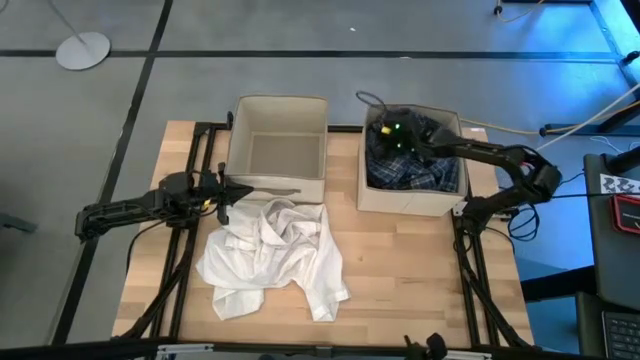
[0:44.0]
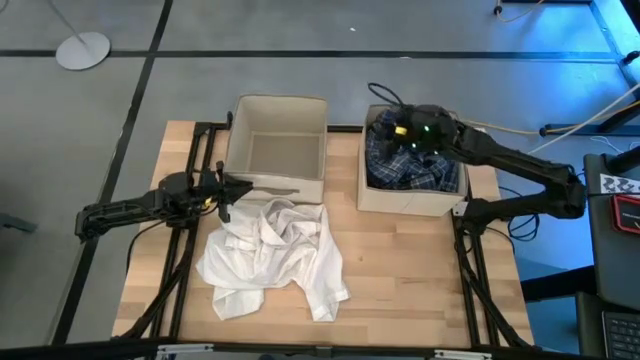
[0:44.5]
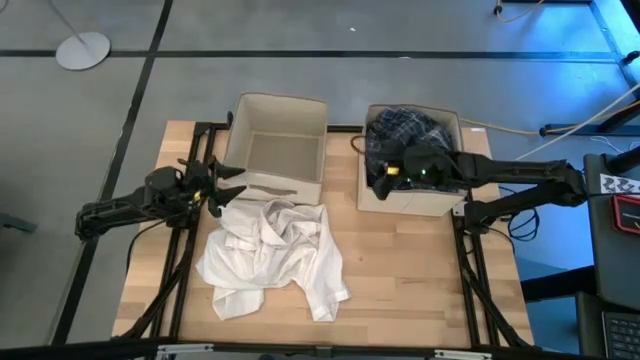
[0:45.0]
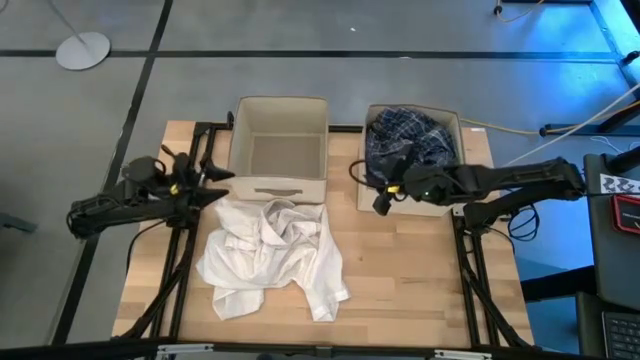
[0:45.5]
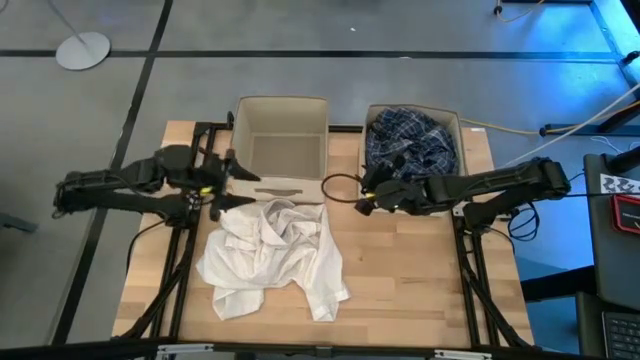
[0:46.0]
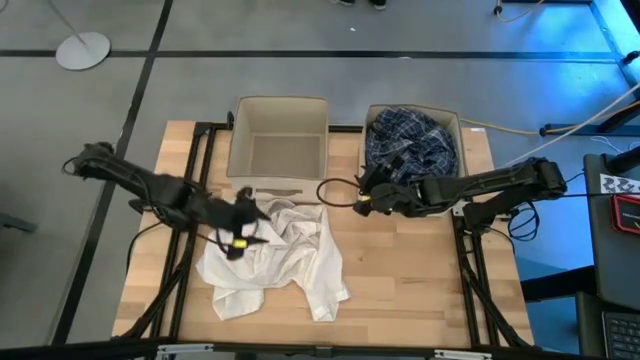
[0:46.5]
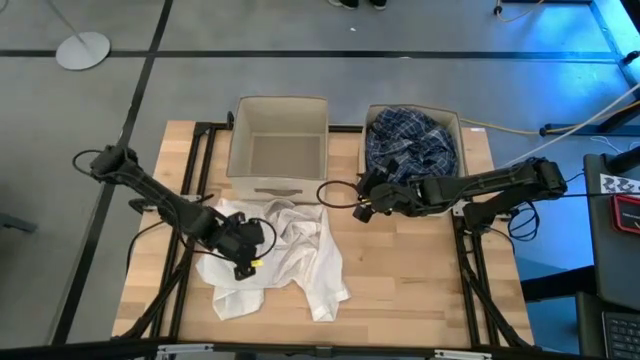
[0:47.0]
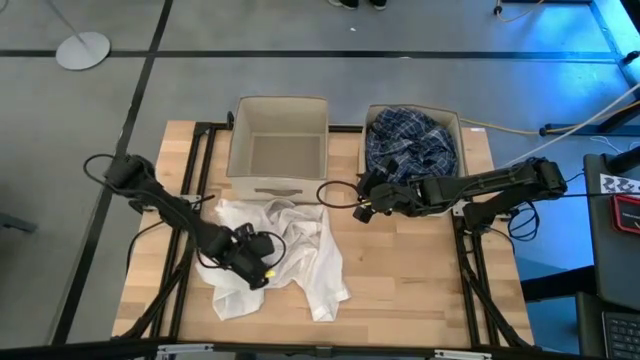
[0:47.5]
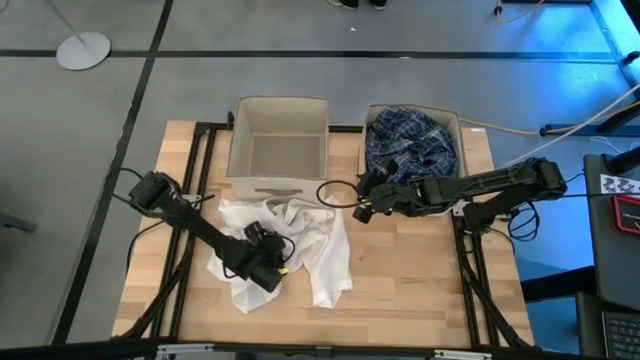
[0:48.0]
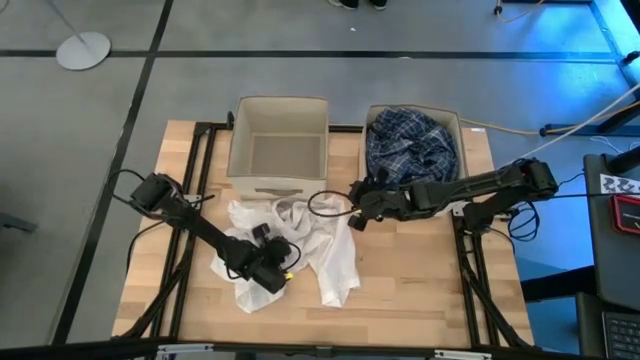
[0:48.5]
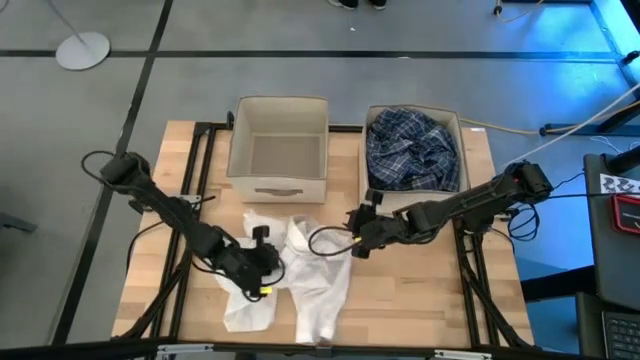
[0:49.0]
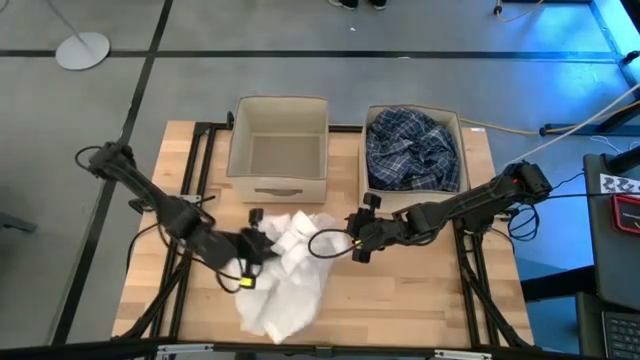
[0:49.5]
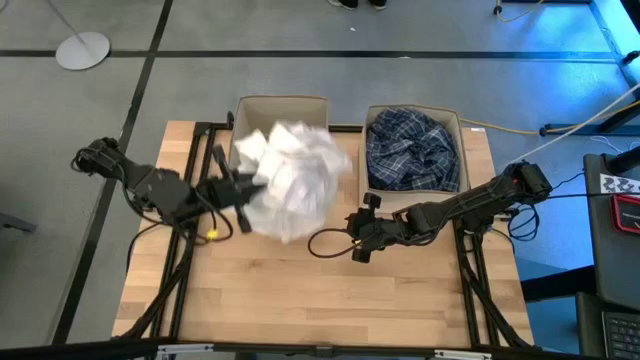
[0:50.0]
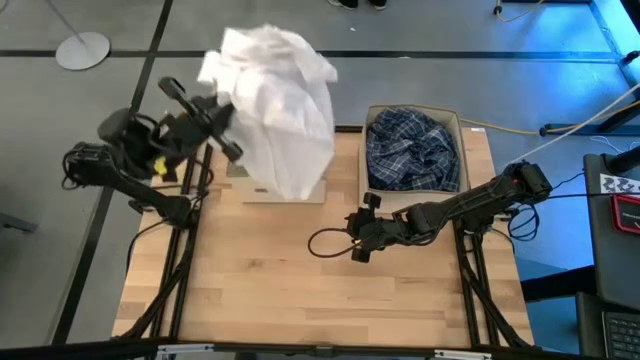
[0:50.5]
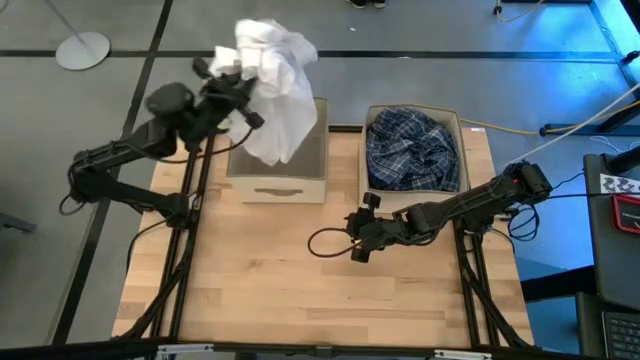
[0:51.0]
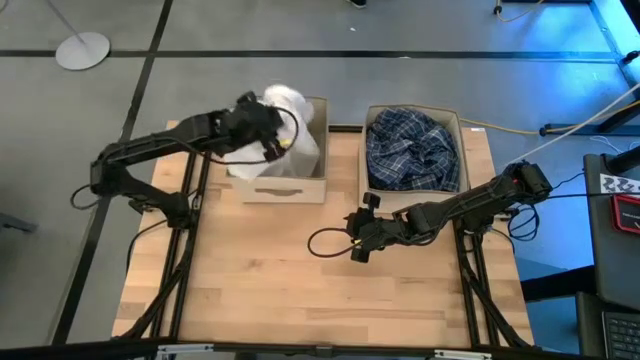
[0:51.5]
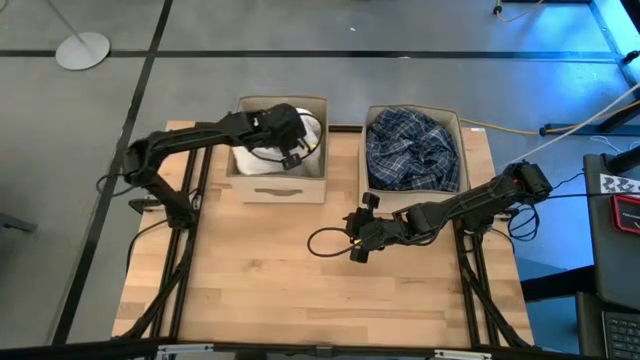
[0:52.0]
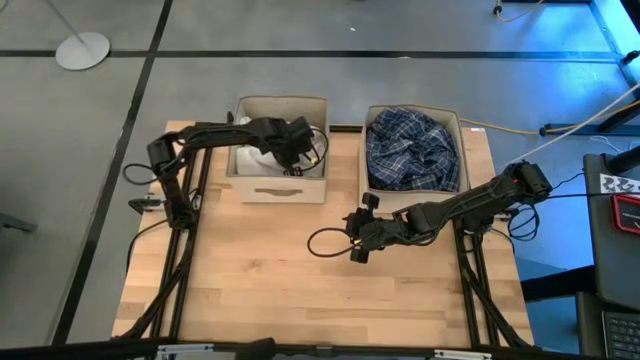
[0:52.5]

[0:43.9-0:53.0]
Task: Sort clothes
Put the white shirt in the left laundry organizer

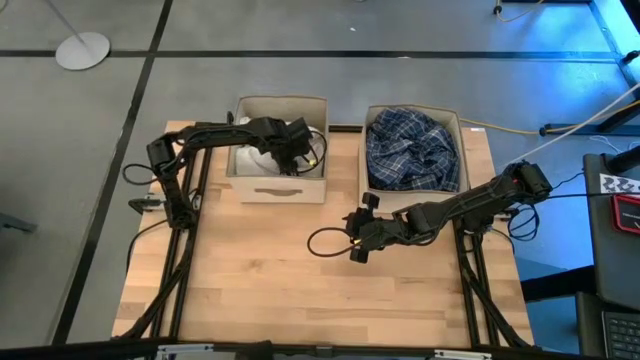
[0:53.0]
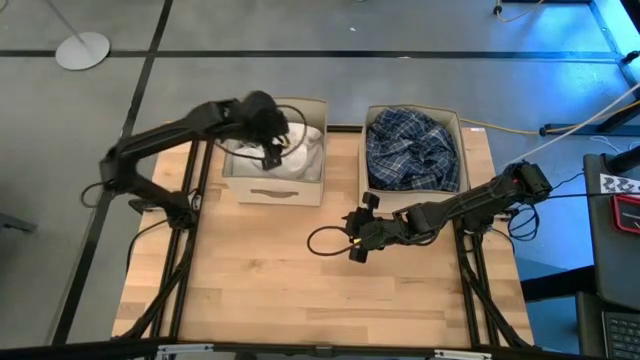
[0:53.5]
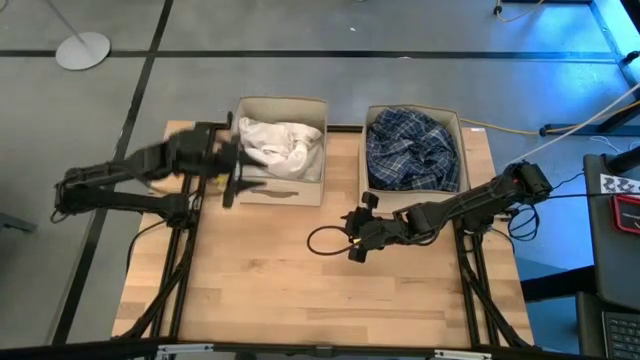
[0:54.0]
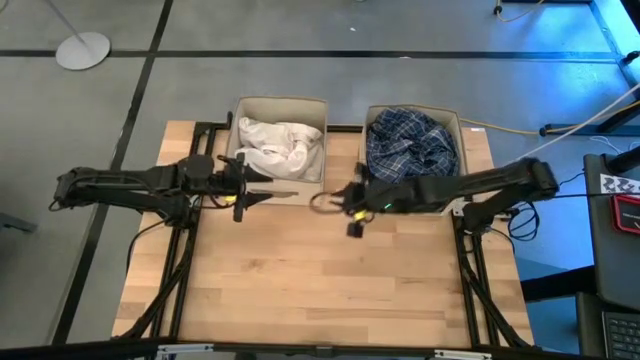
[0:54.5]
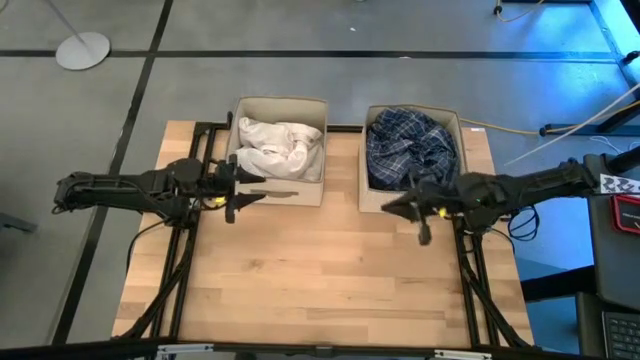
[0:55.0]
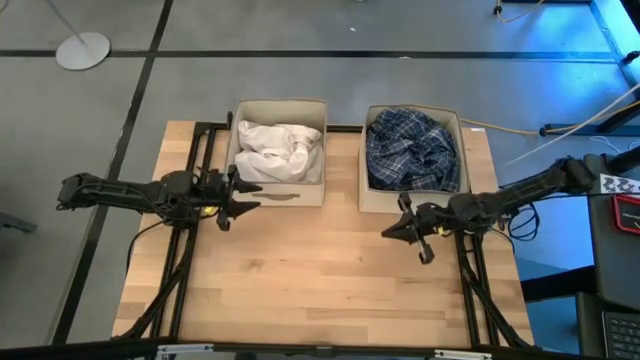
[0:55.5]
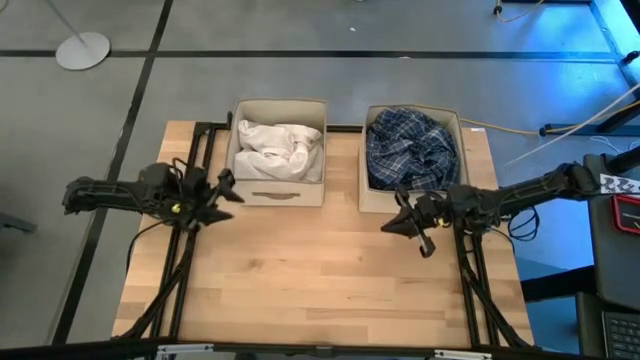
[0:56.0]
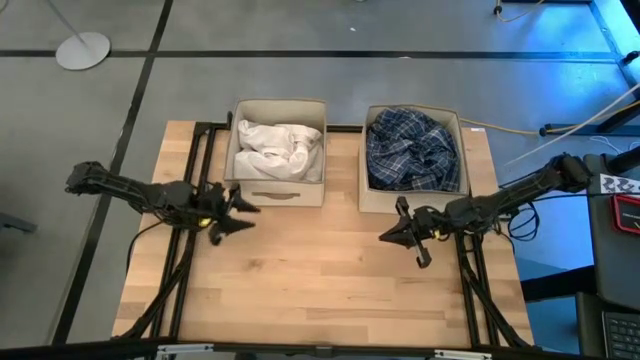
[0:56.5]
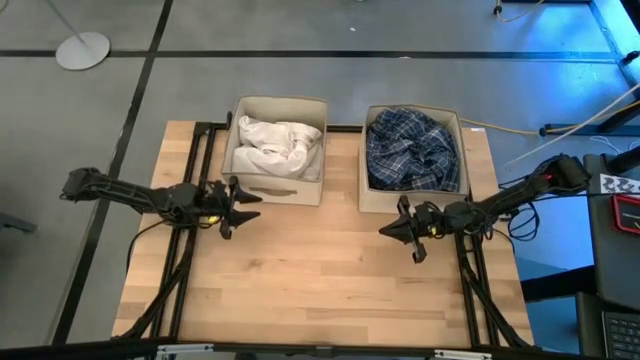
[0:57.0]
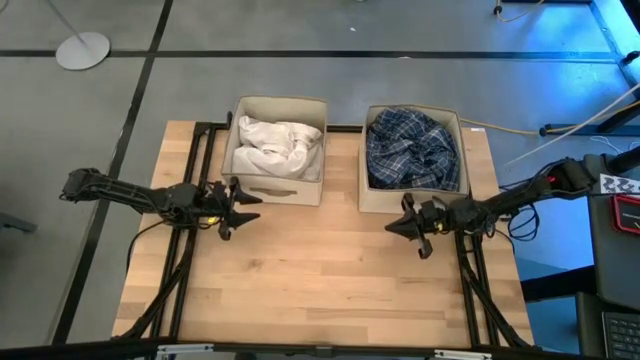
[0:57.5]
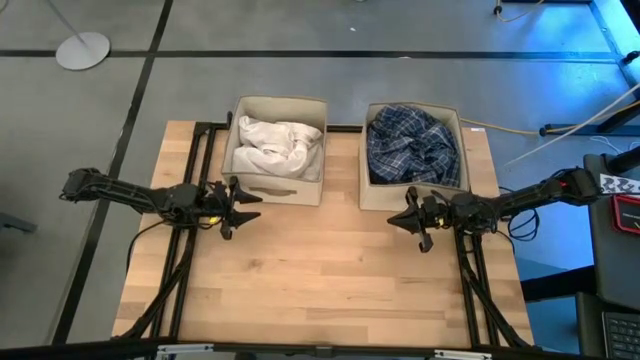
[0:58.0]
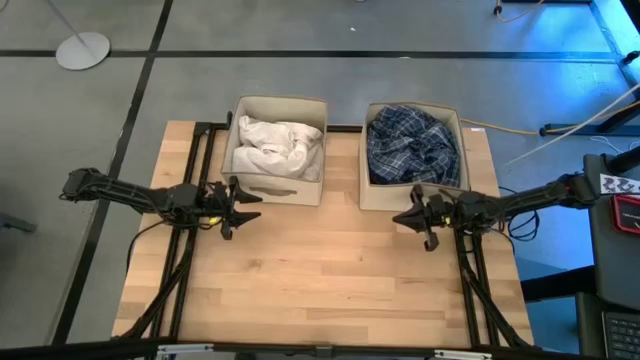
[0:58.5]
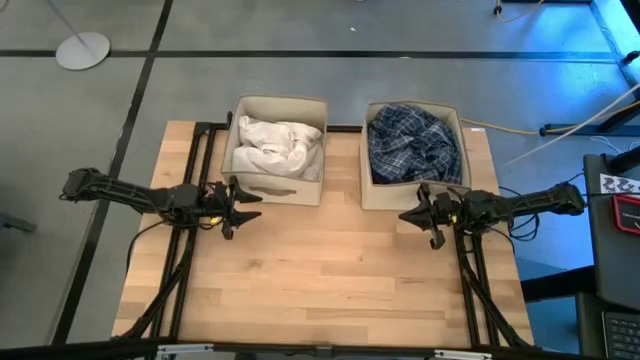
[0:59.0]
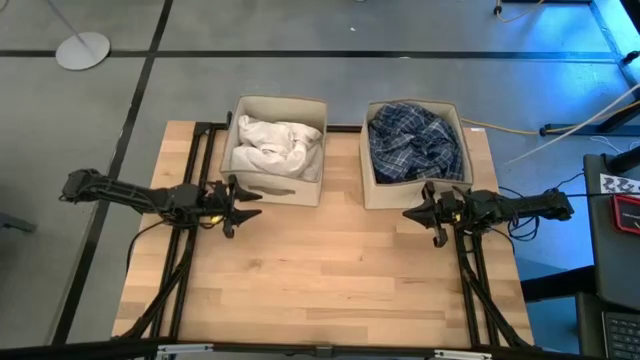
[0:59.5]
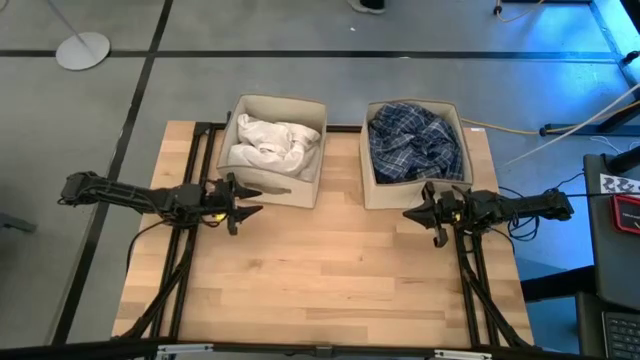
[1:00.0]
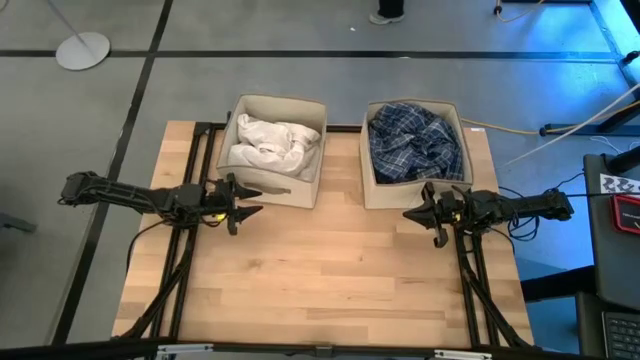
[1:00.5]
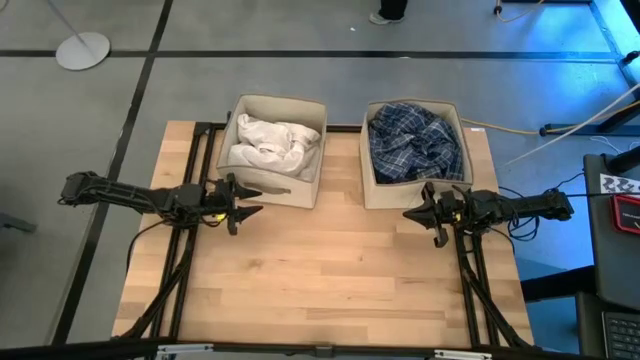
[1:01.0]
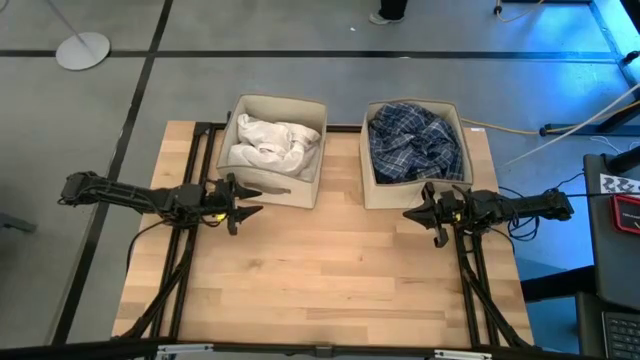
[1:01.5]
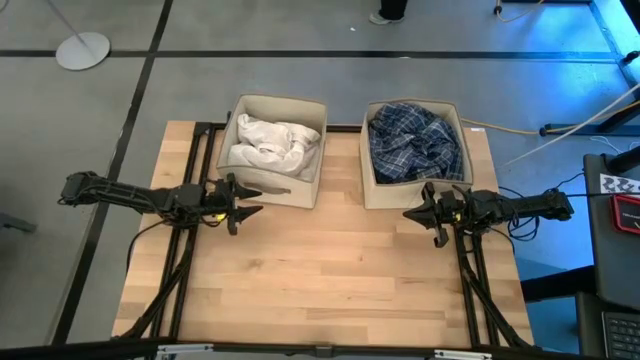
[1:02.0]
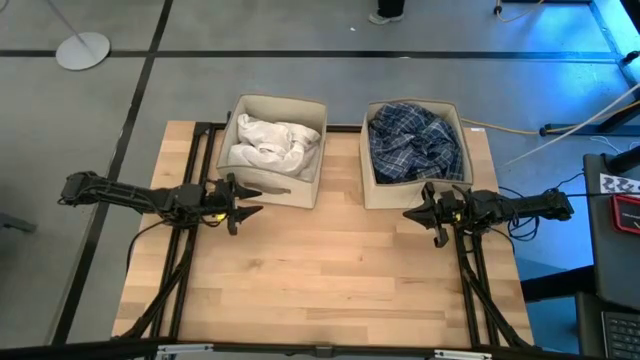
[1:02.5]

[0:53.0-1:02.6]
Return to Home Position

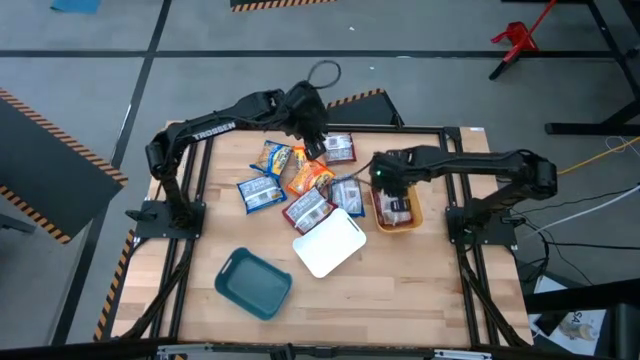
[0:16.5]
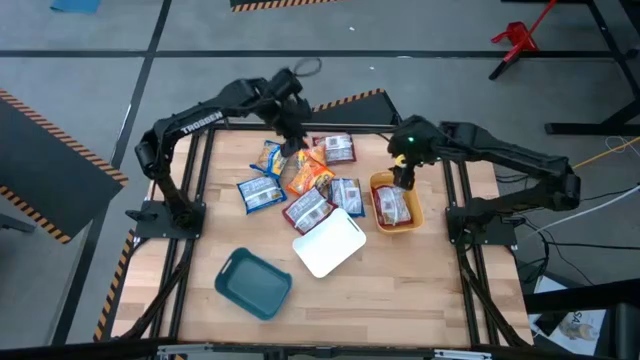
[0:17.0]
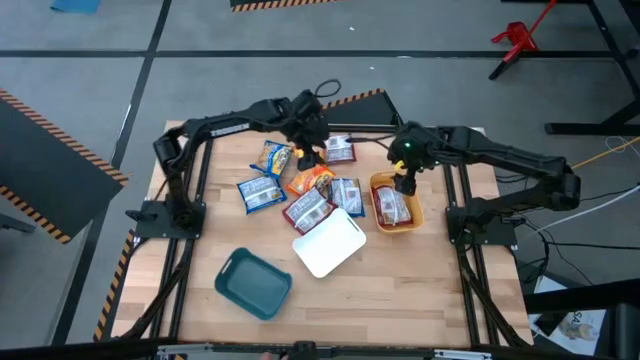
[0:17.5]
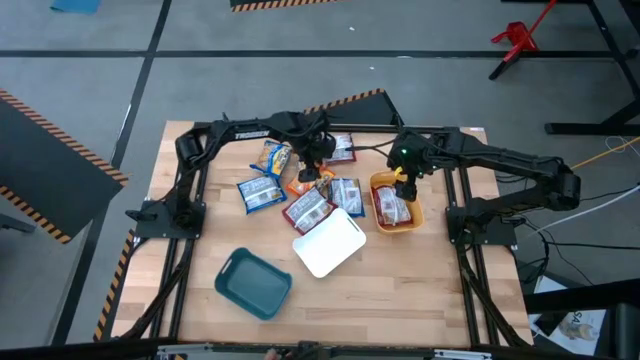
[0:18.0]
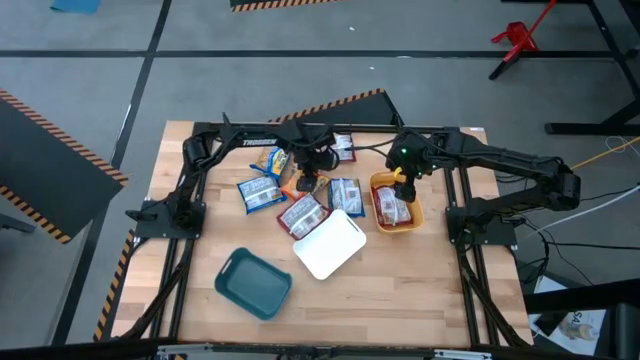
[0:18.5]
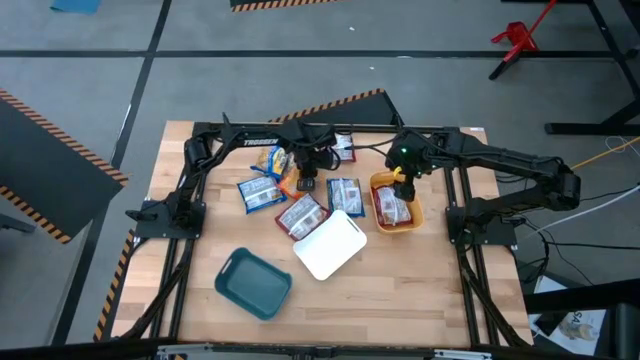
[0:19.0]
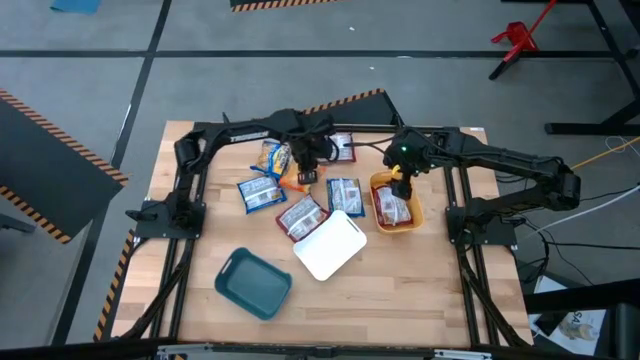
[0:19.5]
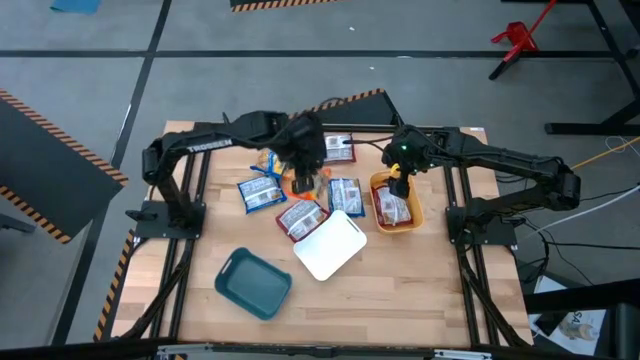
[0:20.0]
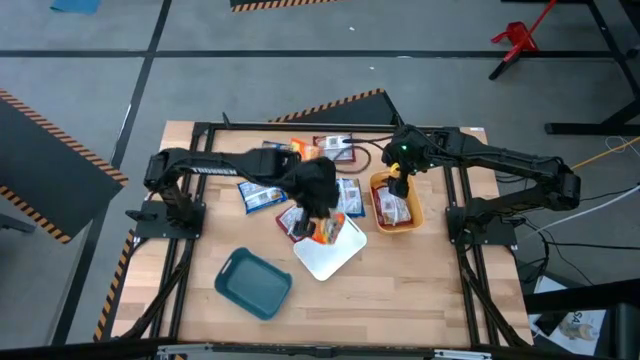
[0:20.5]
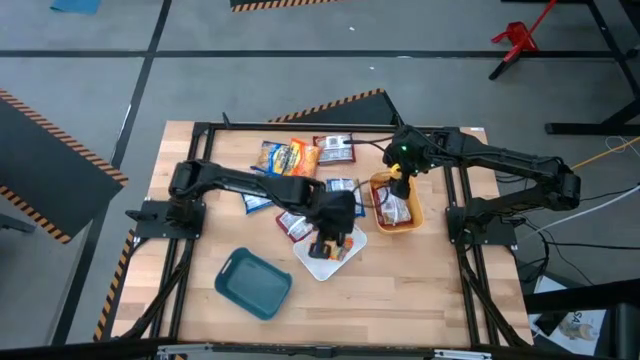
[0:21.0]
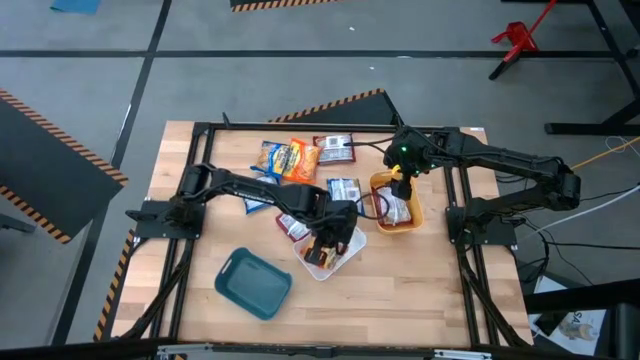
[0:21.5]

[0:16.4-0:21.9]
Task: Sort Maruchan noodles
Put the bottom orange noodle pack into the white bin
